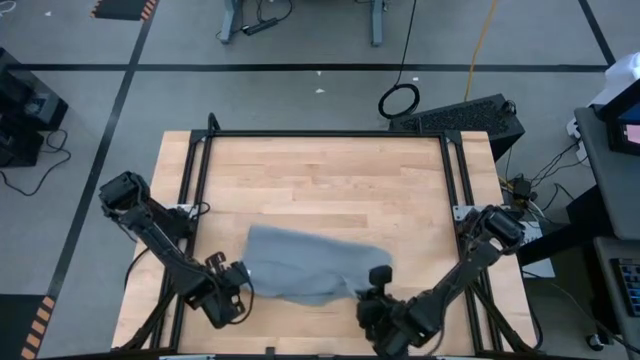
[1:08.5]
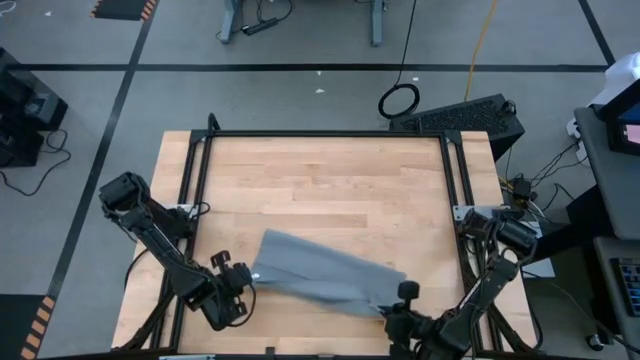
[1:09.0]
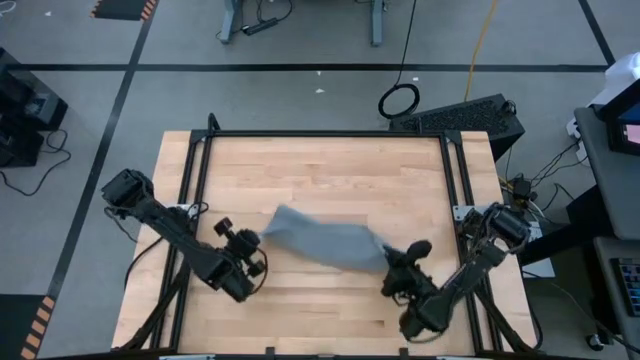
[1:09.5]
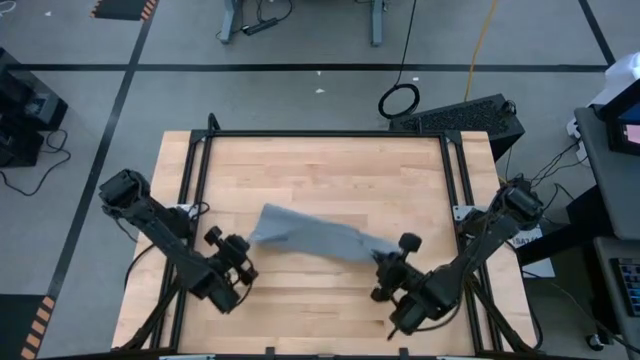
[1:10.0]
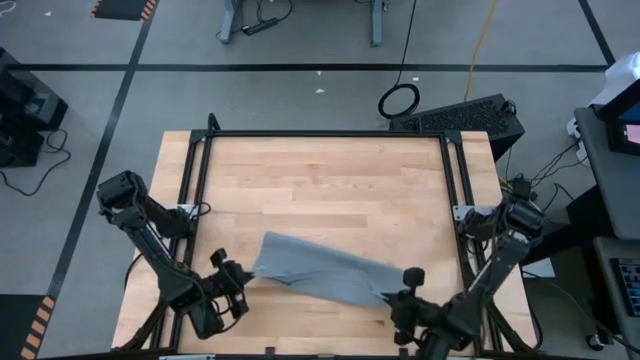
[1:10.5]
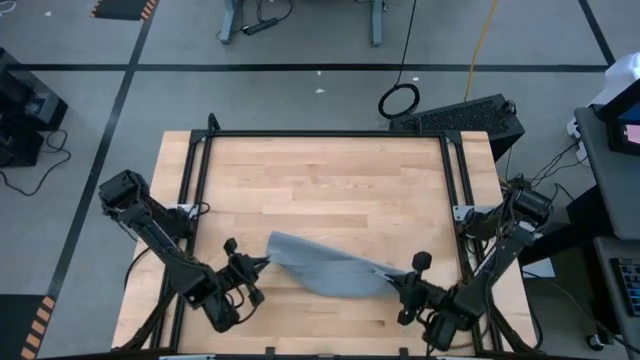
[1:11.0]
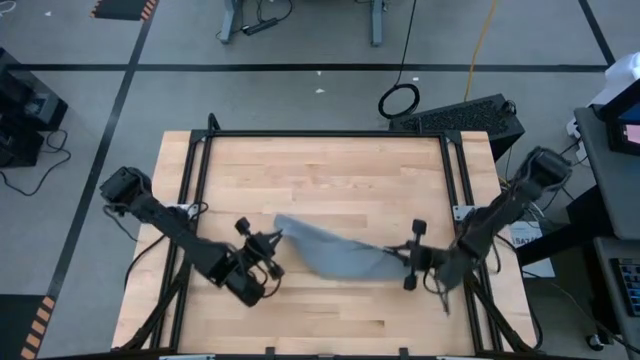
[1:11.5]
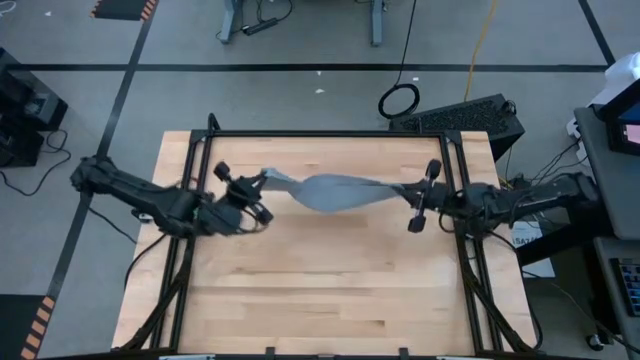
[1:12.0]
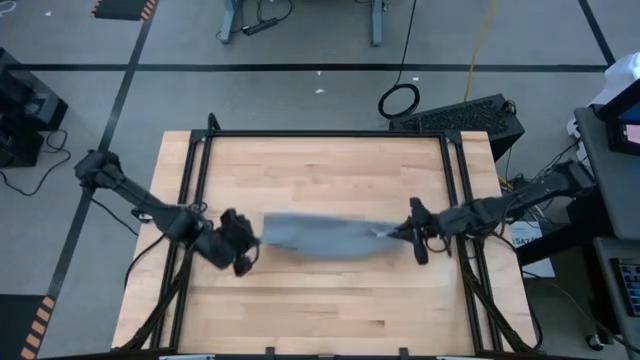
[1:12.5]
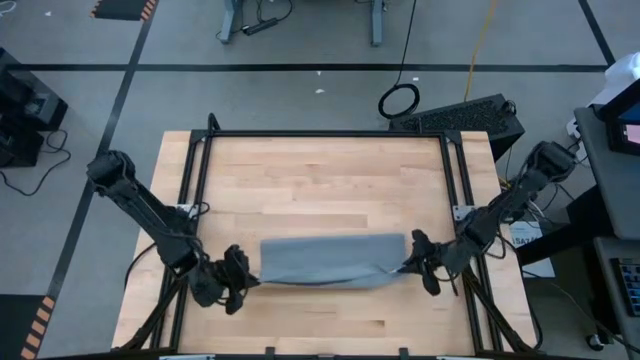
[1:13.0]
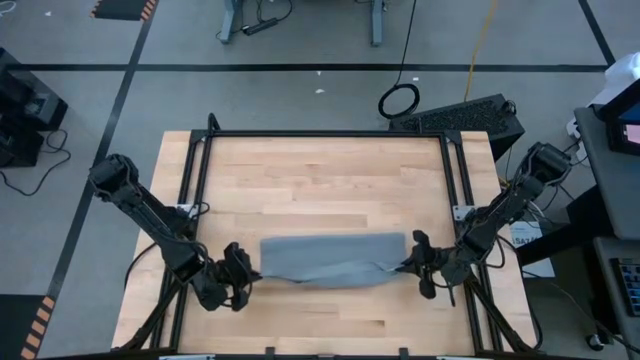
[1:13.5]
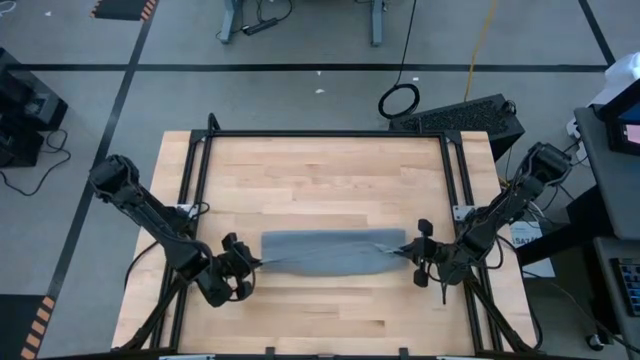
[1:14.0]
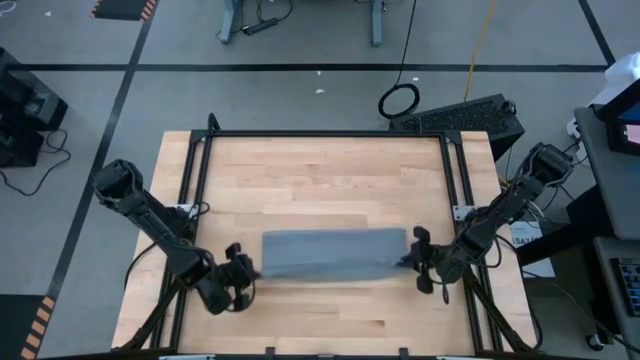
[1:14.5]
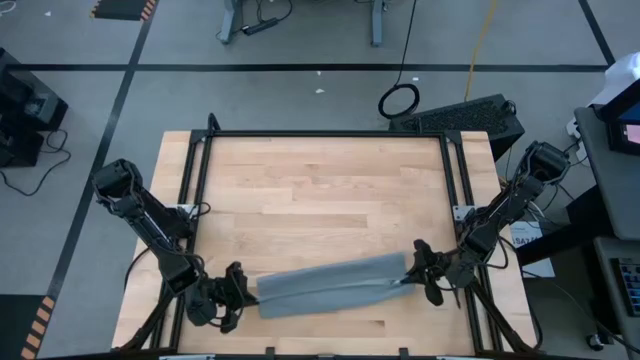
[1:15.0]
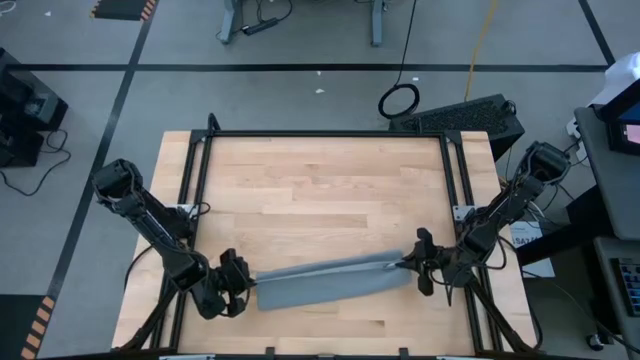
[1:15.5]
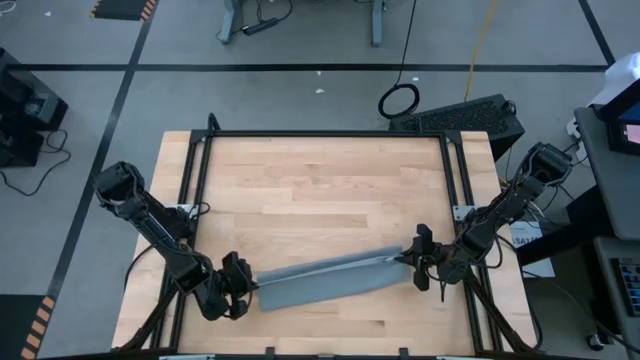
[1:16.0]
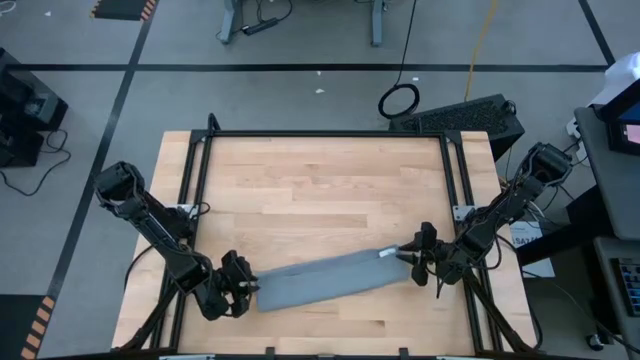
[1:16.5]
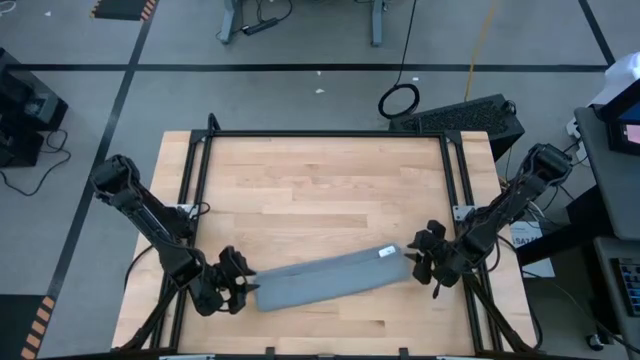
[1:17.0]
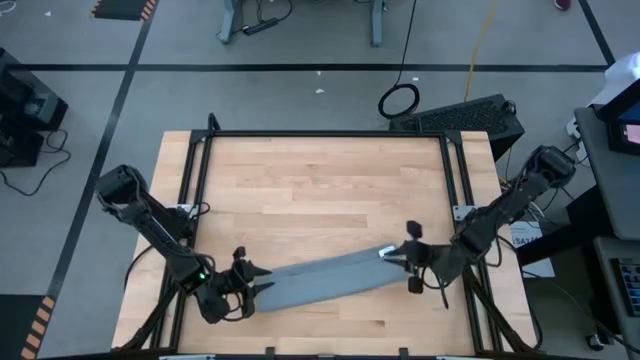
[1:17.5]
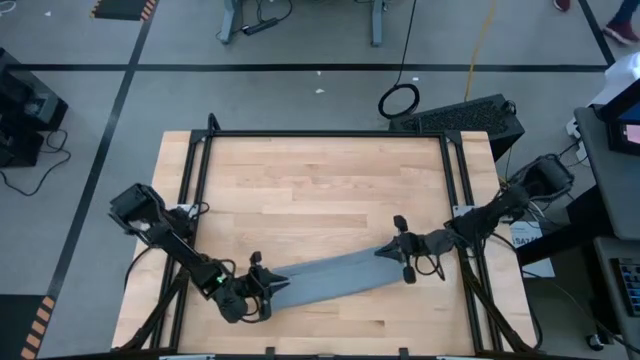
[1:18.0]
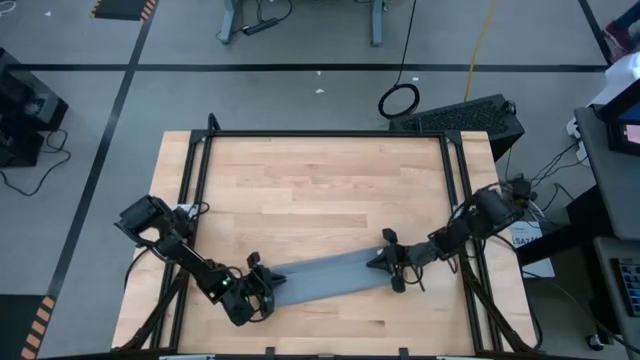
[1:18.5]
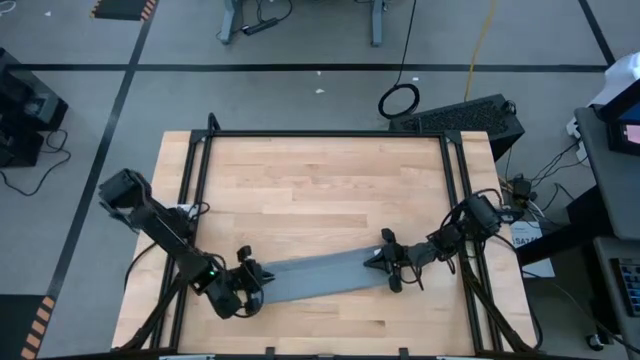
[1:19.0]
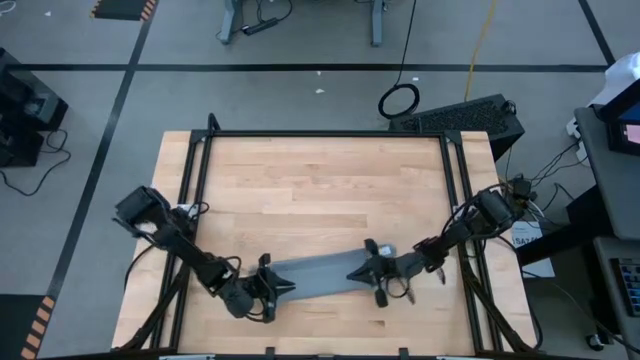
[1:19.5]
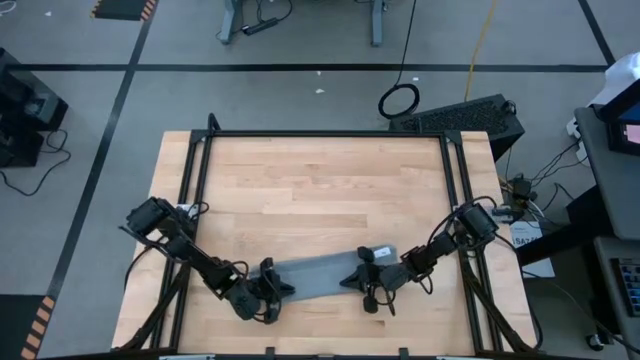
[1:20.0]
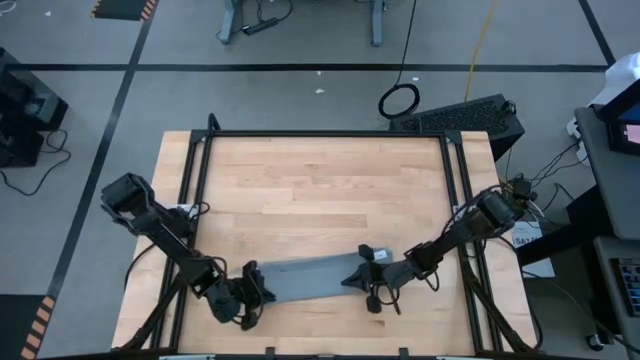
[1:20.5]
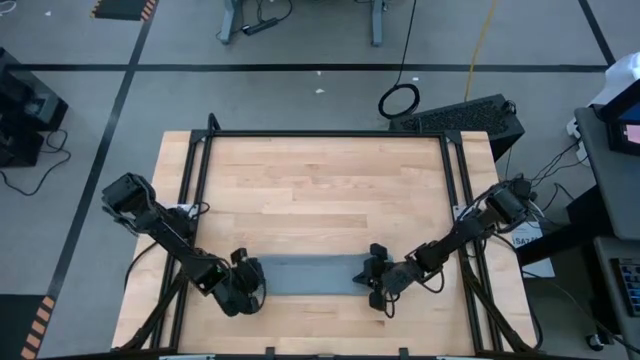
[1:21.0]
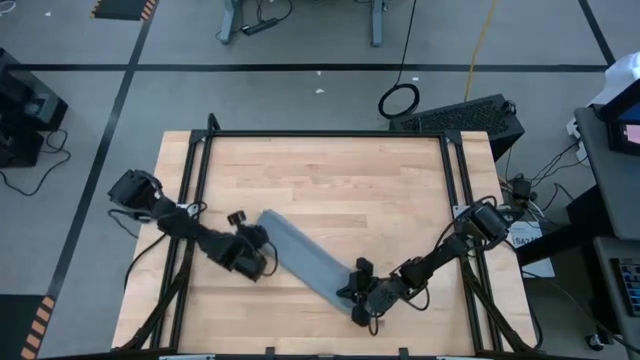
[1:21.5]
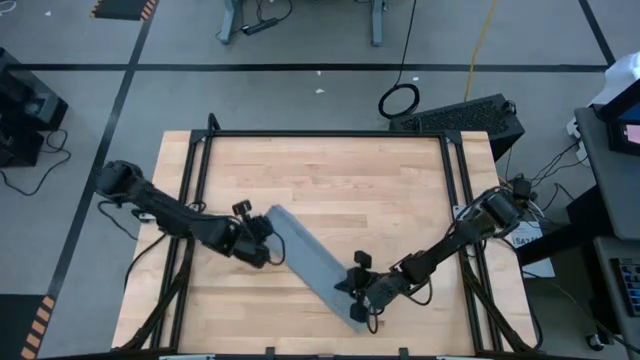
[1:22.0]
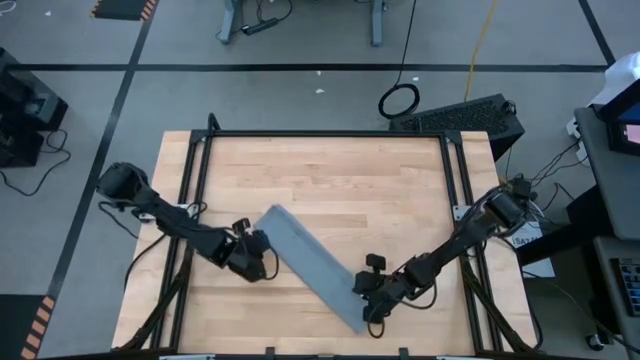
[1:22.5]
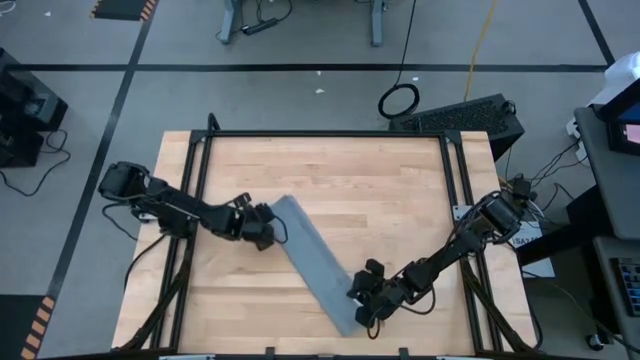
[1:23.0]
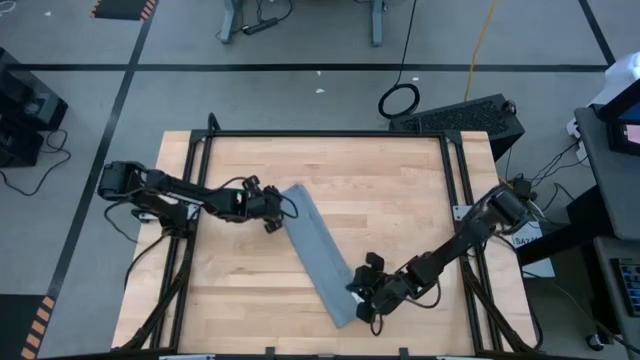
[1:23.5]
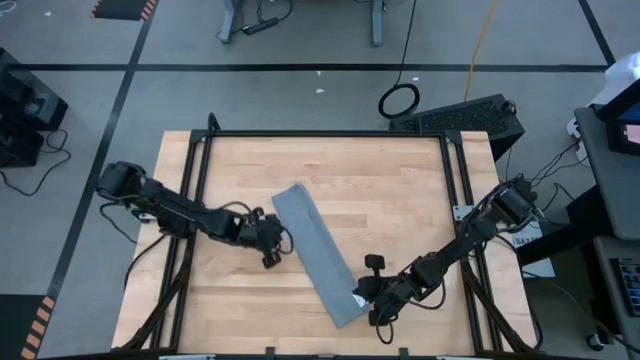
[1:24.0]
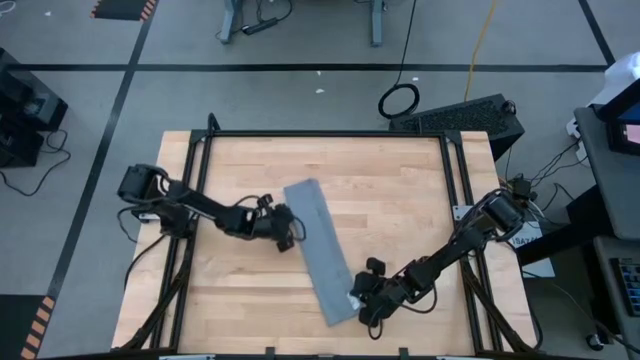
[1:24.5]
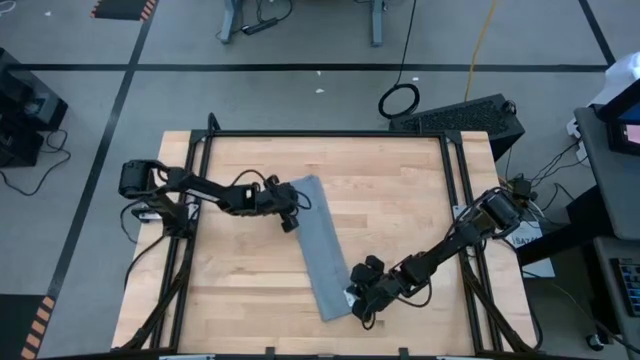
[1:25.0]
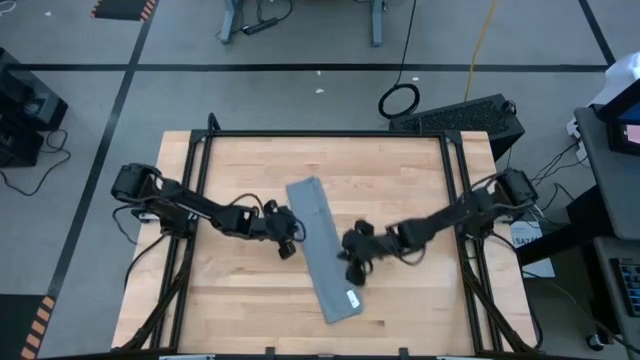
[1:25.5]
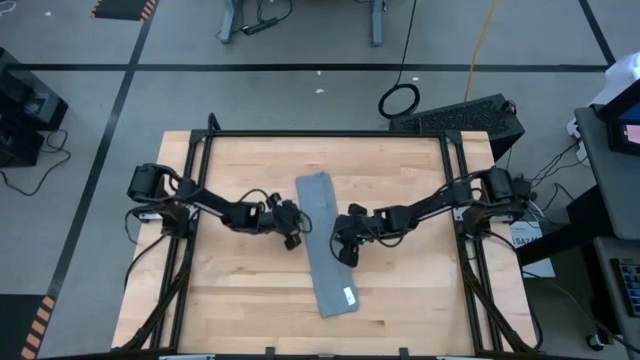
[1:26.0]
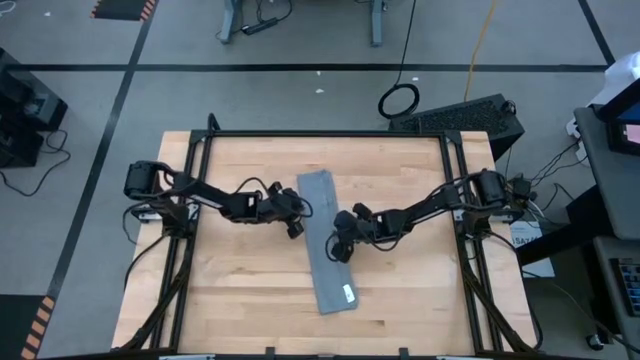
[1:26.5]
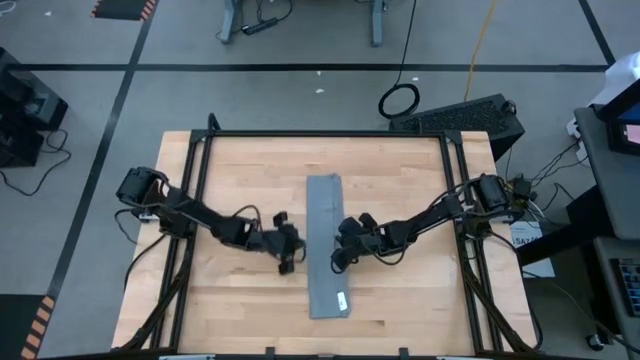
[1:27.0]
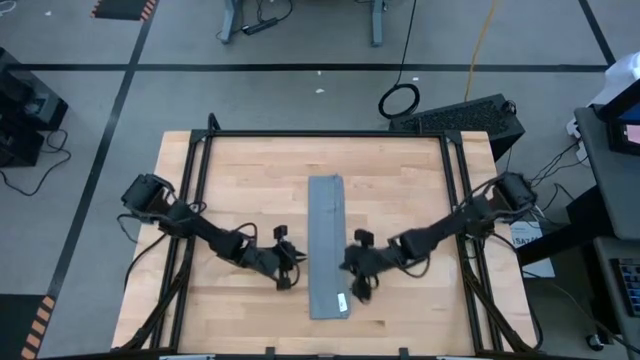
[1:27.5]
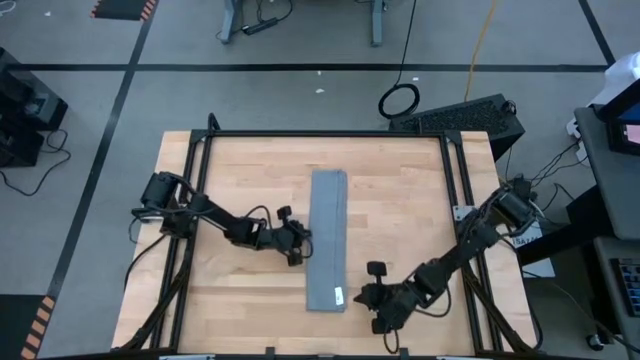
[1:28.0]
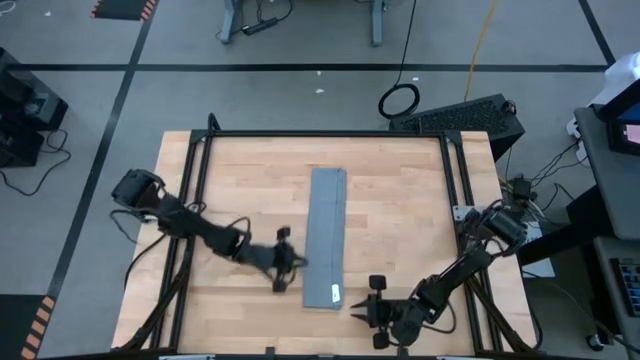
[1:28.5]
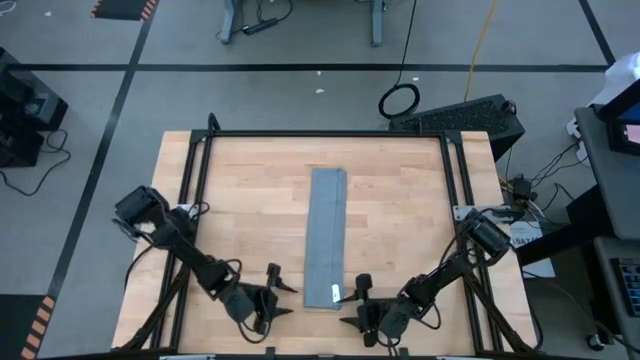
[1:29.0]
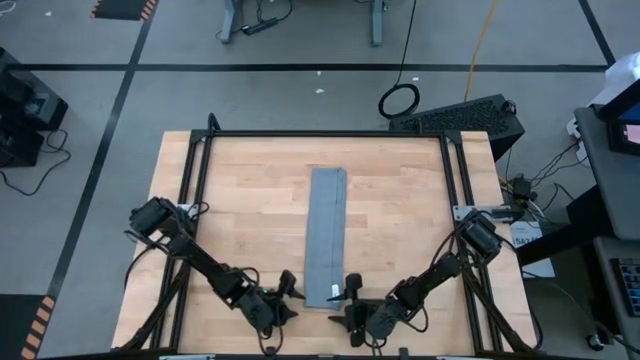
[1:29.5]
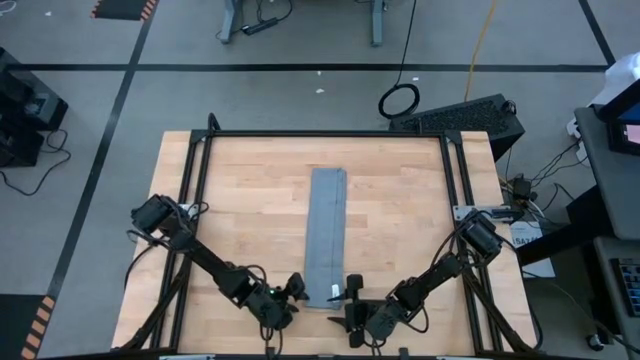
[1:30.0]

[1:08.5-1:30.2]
Task: Roll towel
Fold the gray towel on the table
